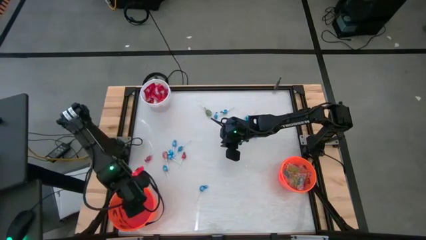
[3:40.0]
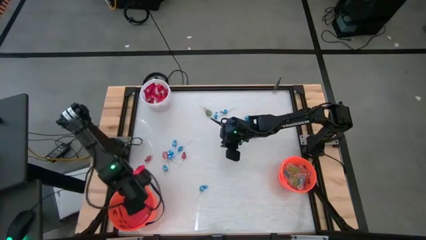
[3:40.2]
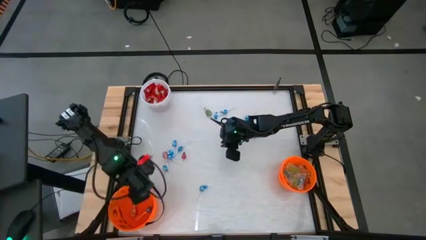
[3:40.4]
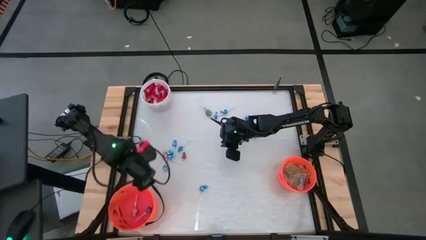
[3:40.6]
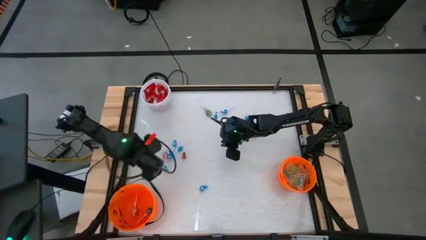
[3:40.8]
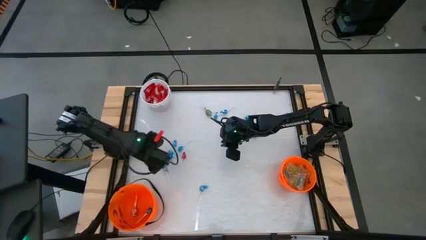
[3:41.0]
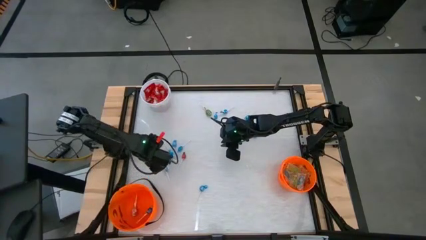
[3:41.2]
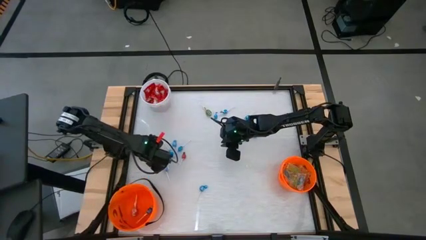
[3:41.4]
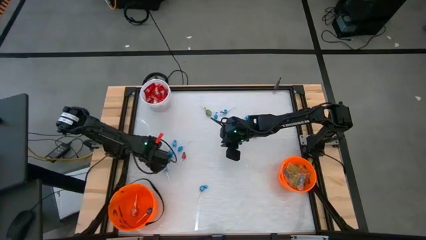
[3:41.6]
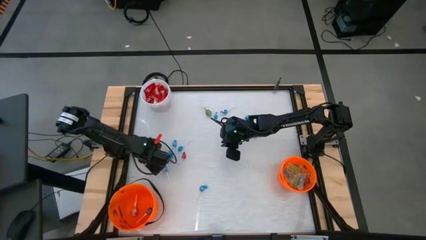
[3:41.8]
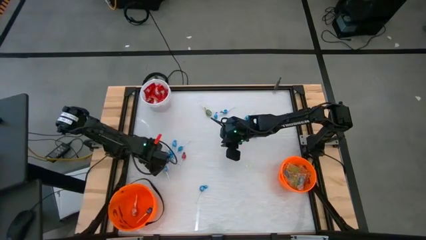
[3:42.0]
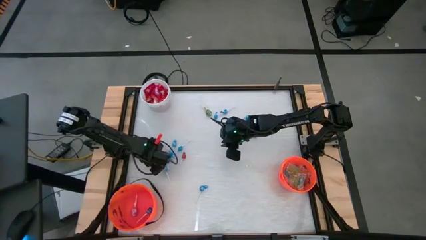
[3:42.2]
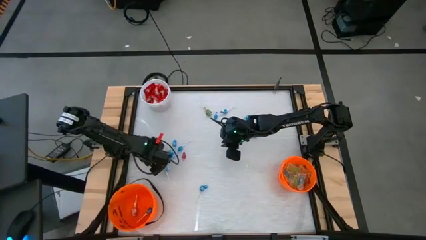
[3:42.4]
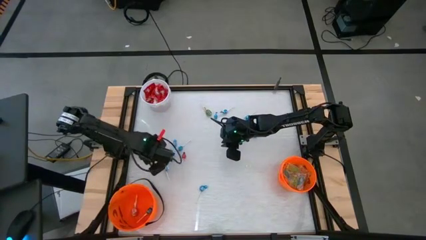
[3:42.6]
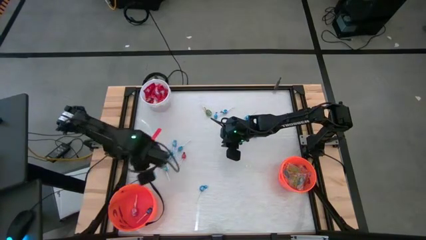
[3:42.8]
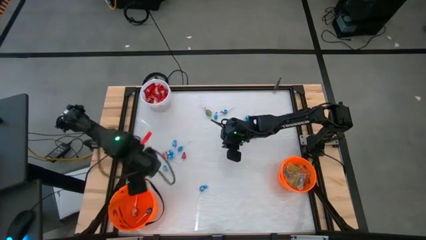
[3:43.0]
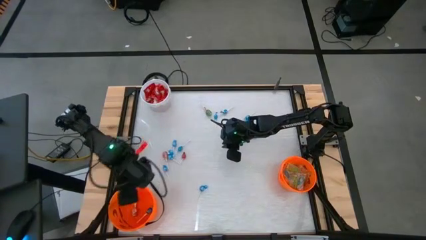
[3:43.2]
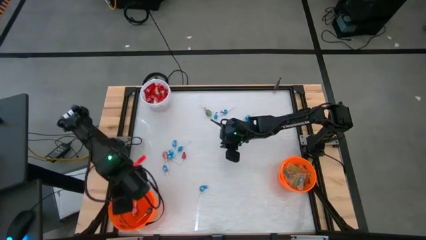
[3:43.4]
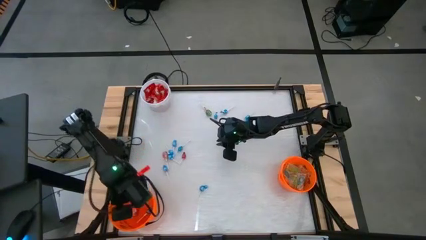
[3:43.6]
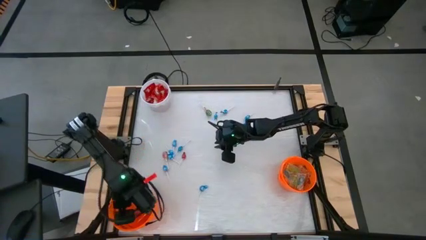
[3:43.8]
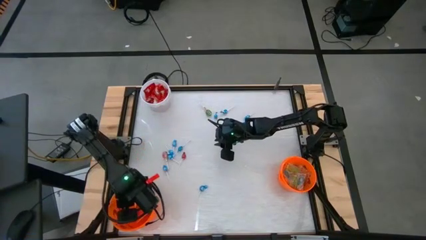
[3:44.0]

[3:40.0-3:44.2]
Task: Sort candy by brand, put in halloween buckets
Put the left small red sucker into the left orange bucket

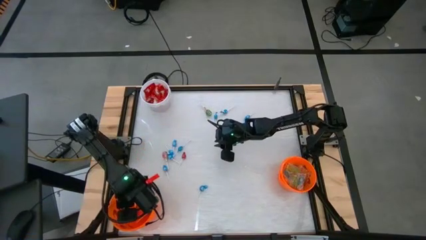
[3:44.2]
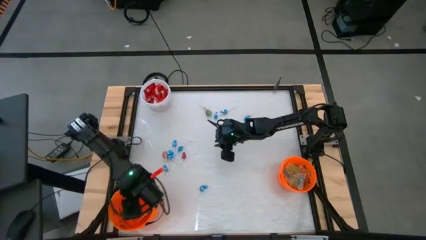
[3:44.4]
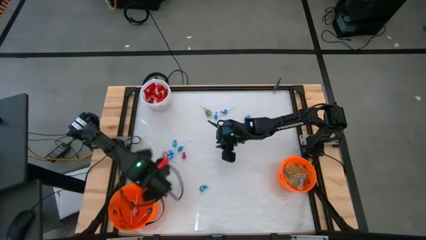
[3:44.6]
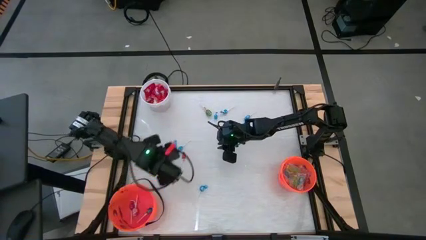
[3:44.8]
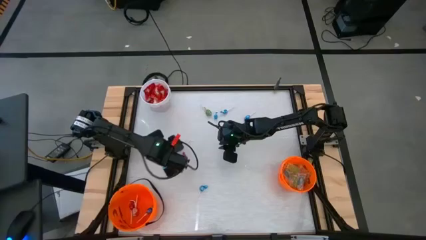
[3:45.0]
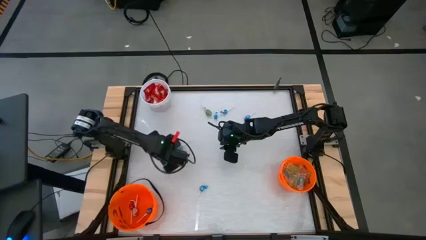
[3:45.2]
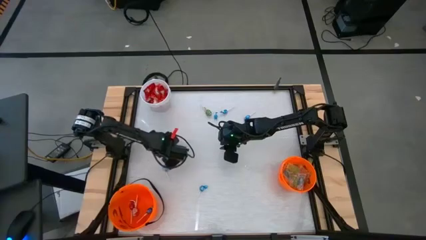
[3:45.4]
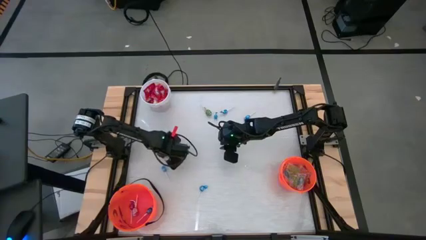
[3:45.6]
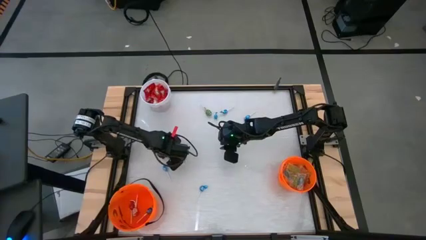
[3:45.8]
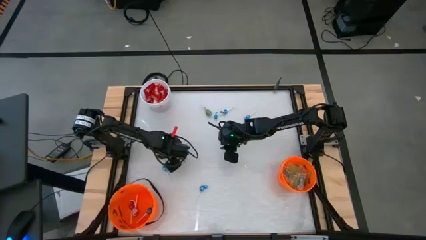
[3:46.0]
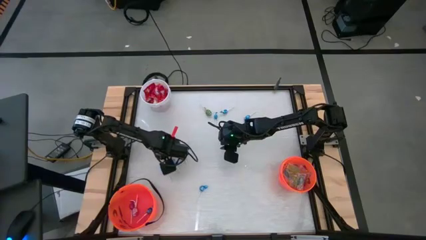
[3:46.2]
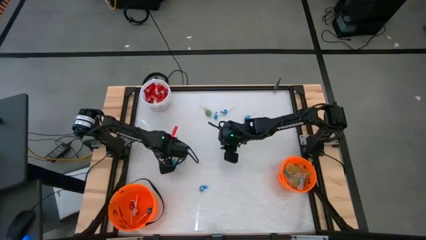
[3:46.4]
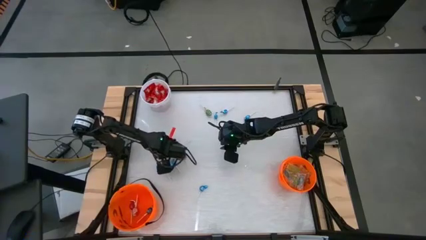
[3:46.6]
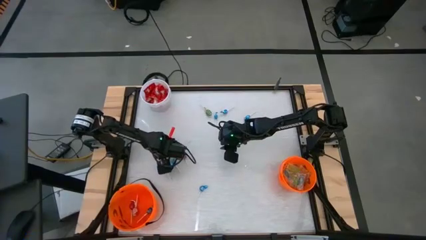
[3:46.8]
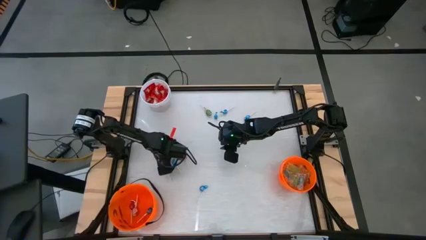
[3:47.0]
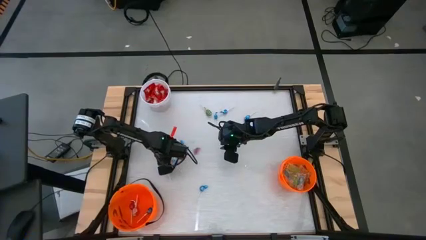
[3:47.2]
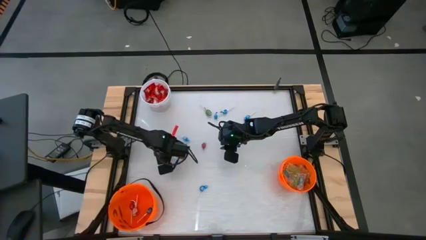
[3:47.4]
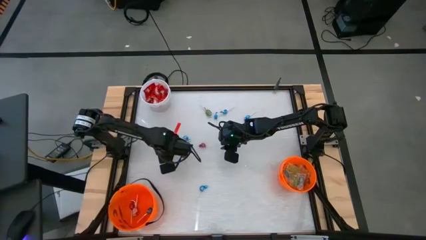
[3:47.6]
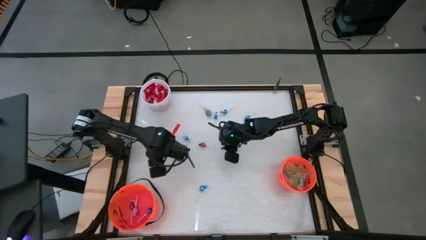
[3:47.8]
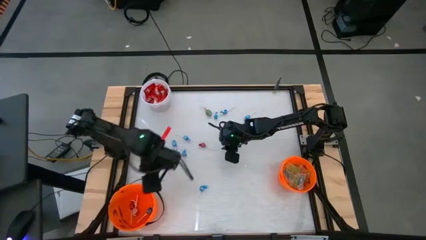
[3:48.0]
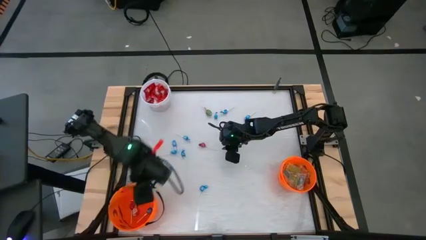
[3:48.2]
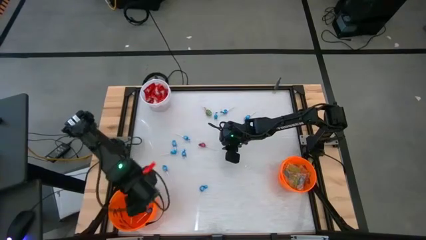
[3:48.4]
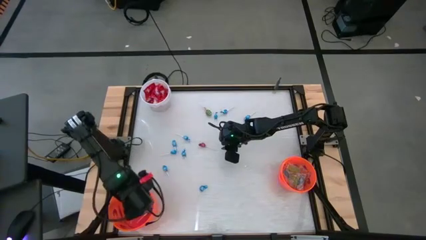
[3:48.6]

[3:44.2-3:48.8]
Put the left red sucker into the left orange bucket

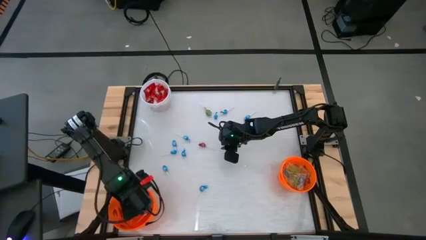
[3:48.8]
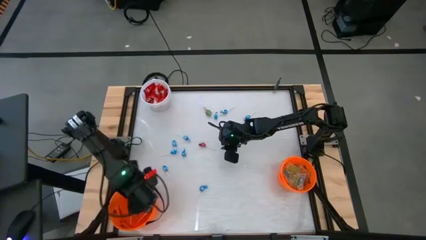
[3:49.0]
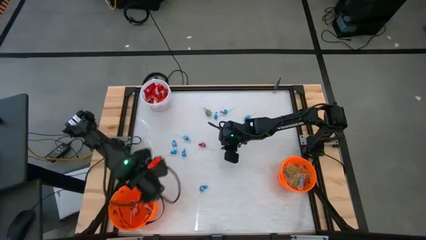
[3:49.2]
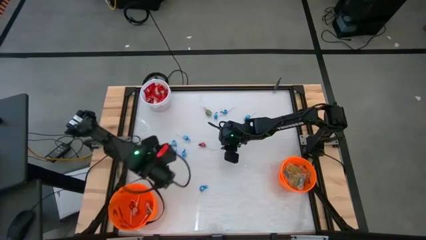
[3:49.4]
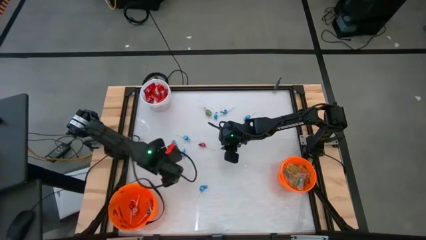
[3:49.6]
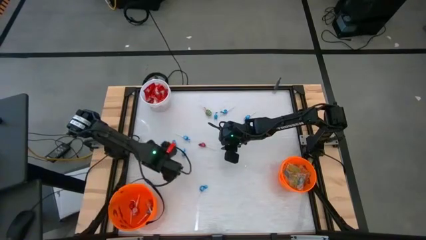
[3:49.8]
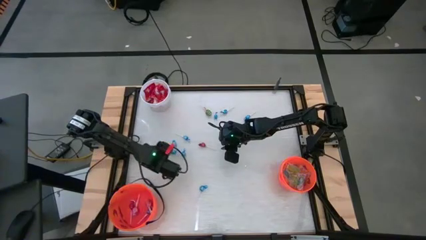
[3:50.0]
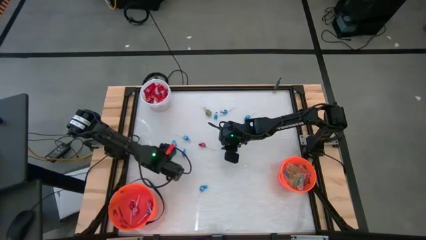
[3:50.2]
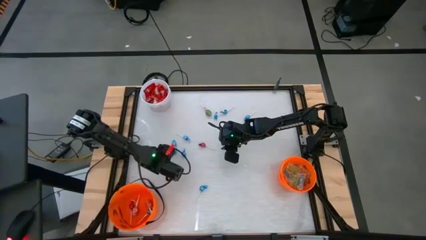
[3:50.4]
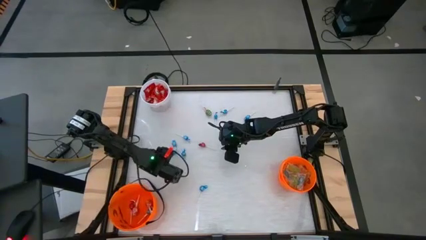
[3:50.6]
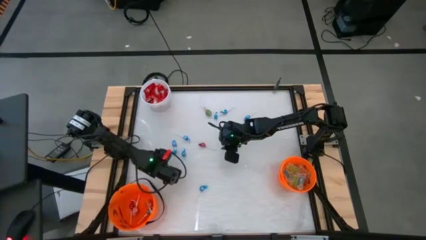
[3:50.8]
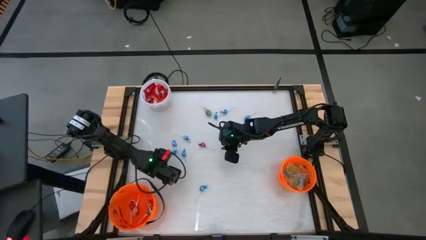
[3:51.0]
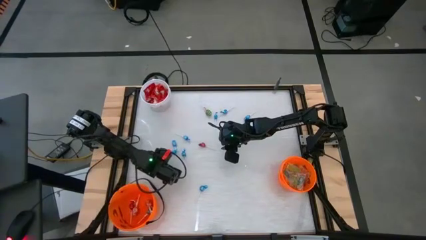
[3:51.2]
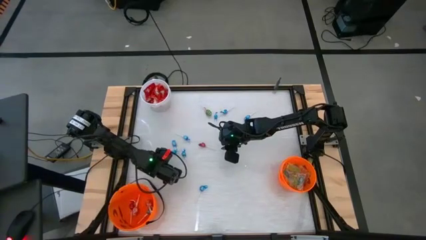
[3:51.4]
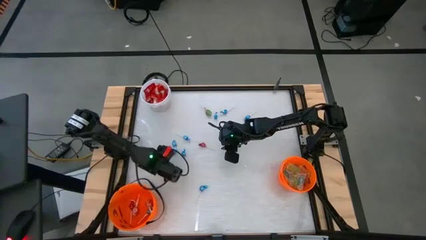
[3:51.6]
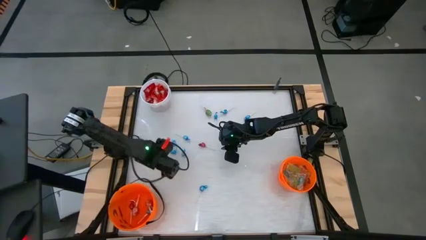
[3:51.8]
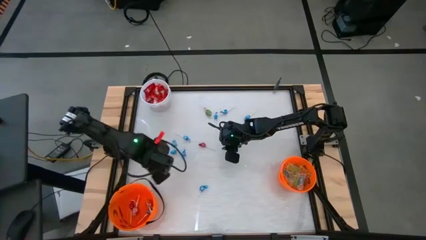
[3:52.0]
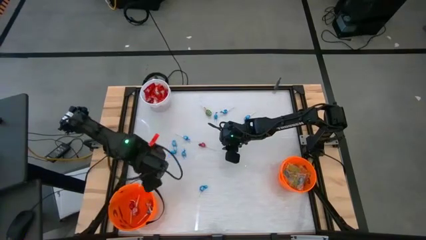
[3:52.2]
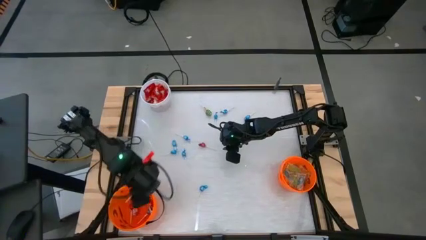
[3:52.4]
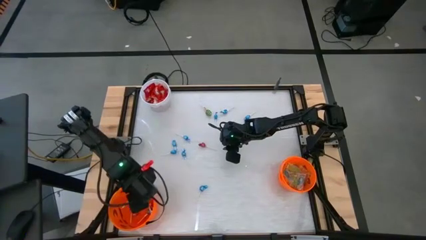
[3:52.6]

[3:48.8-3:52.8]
Put the blue sucker into the left orange bucket

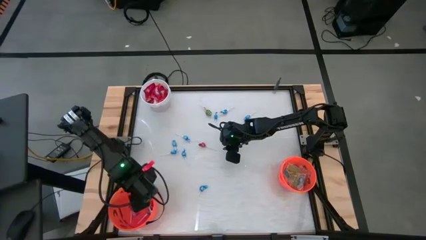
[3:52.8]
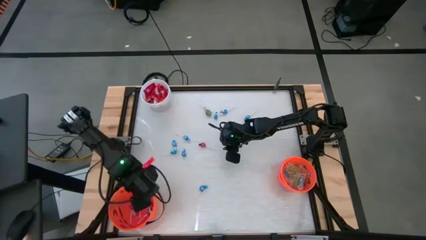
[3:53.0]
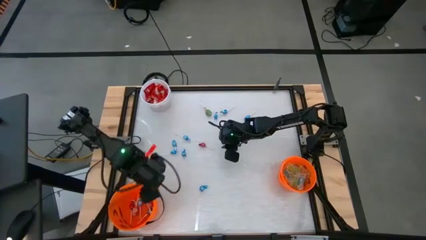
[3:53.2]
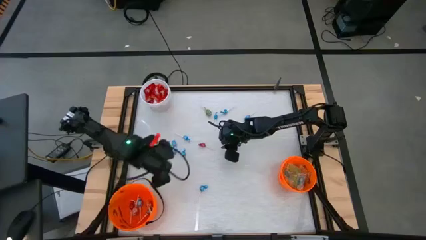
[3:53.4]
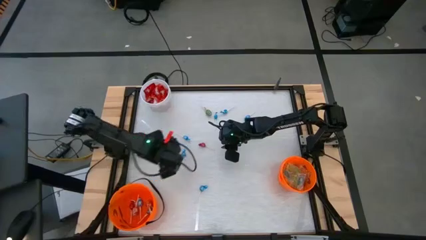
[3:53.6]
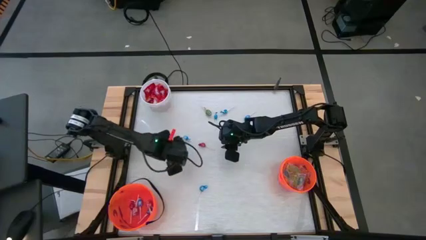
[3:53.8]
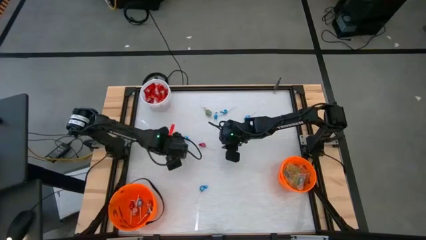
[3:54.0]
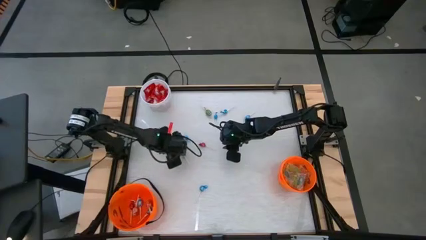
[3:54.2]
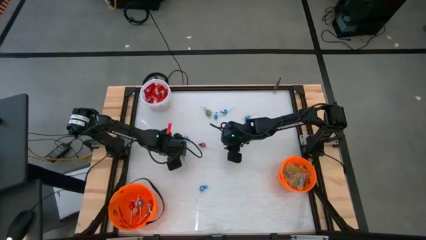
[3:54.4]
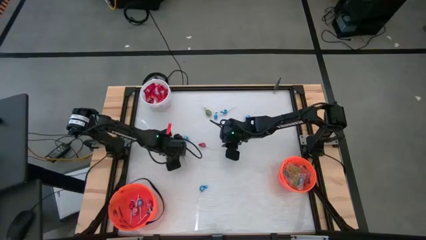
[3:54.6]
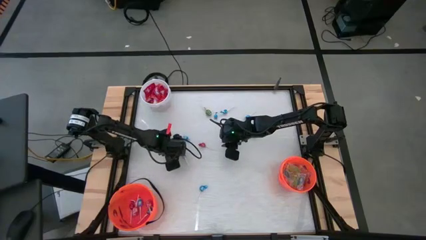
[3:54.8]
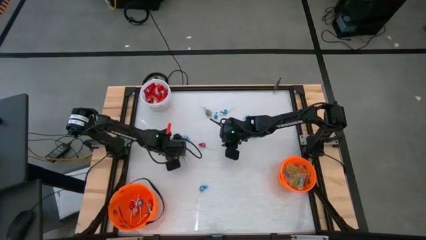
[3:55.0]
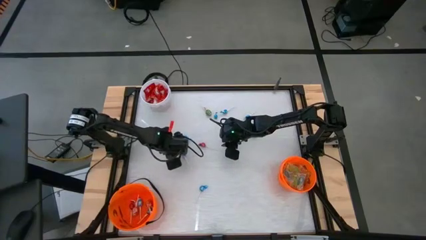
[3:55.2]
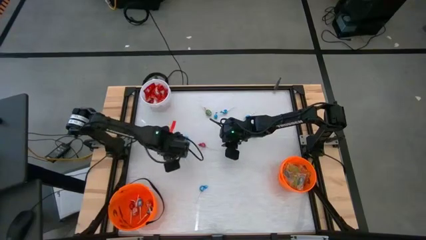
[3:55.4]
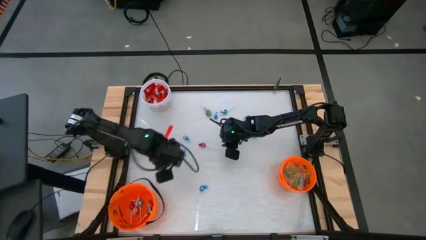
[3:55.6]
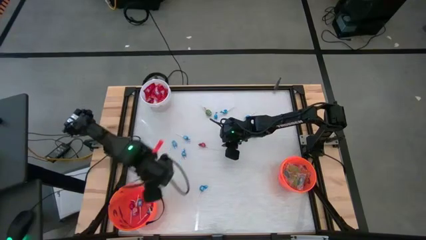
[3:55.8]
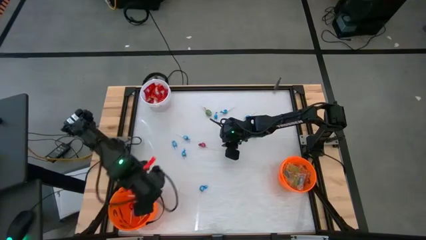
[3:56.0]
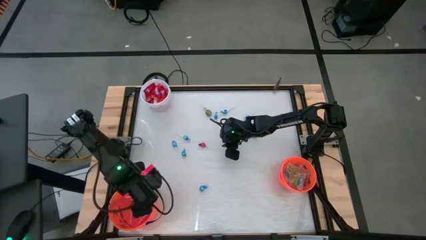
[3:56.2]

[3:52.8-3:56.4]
Put the blue sucker into the left orange bucket

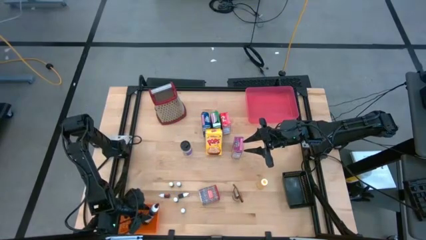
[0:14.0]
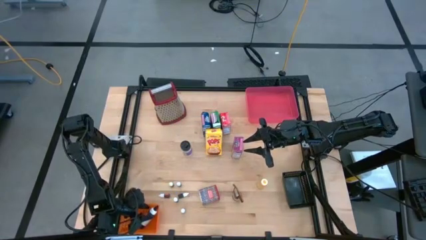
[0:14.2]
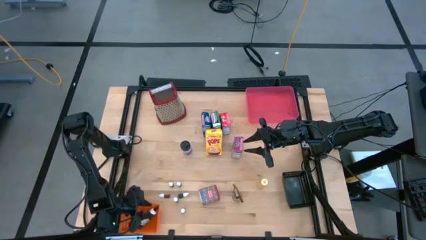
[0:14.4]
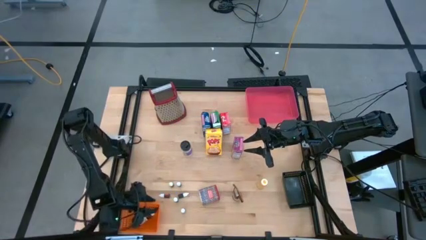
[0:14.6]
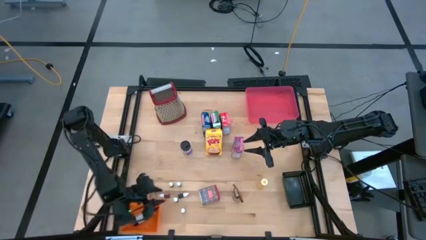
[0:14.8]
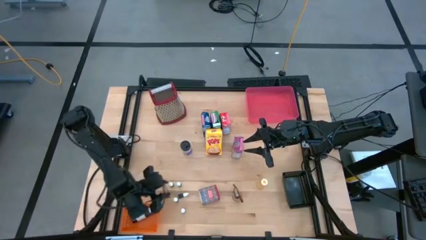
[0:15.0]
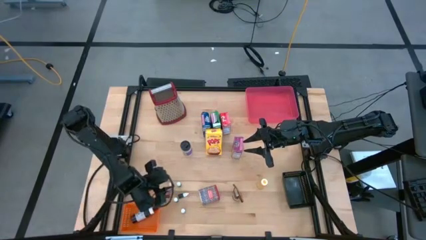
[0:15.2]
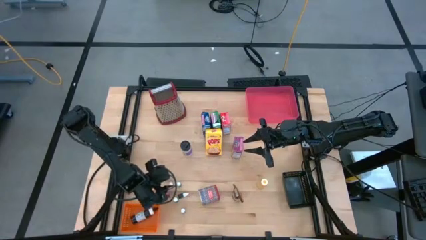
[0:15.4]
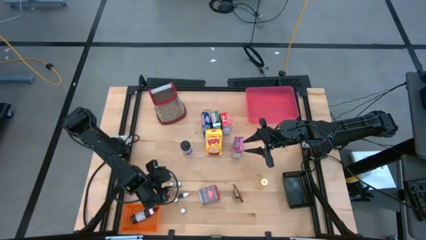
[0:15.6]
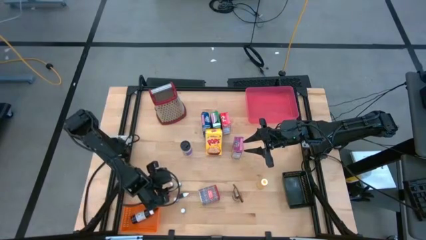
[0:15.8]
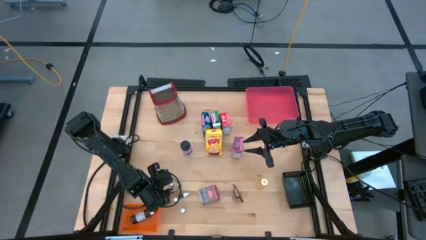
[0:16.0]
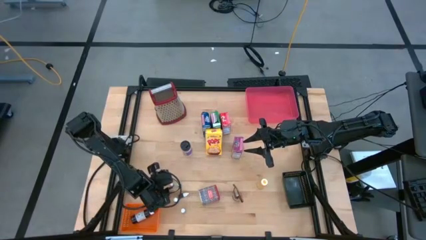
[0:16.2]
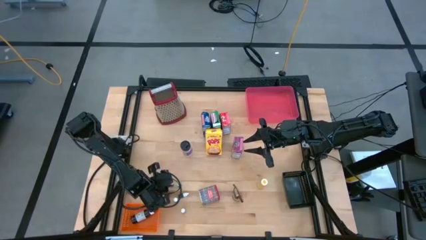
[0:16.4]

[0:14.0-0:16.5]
Task: Pick & Place Kitchen Items
Put the small black food coloring bottle into the orange bin
